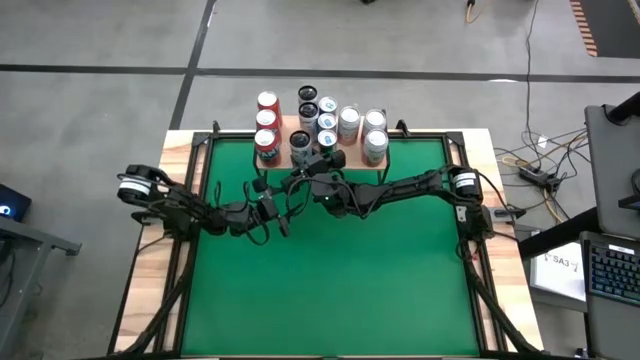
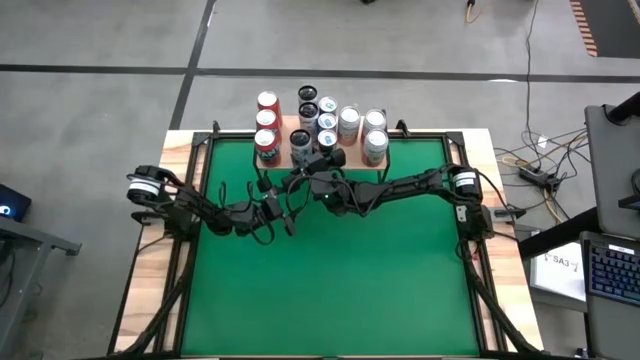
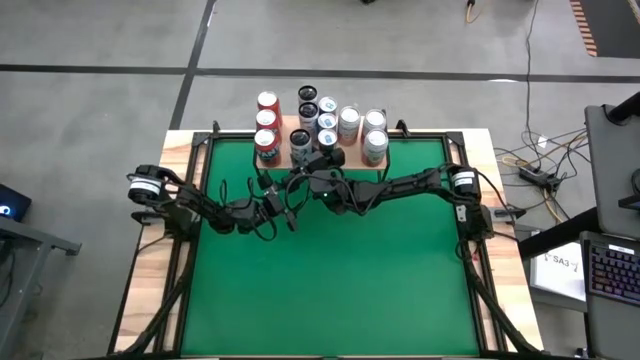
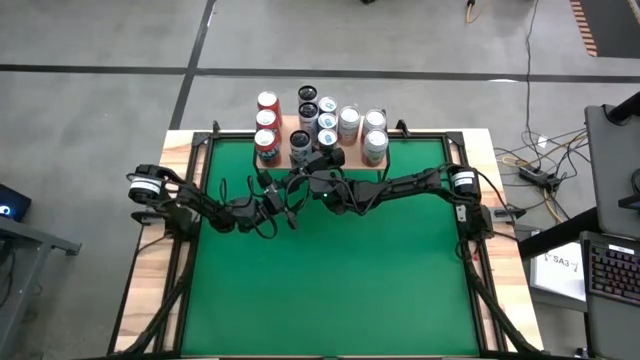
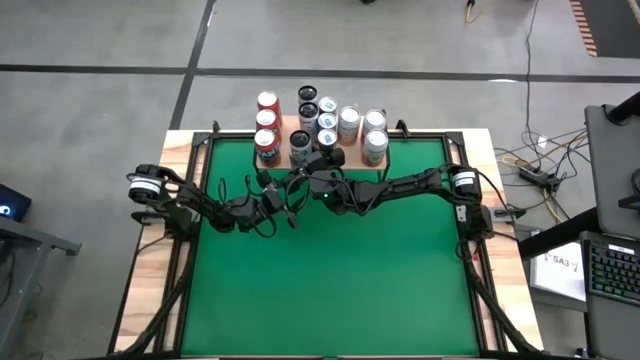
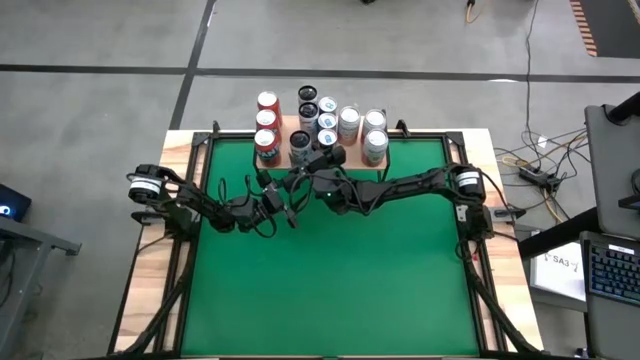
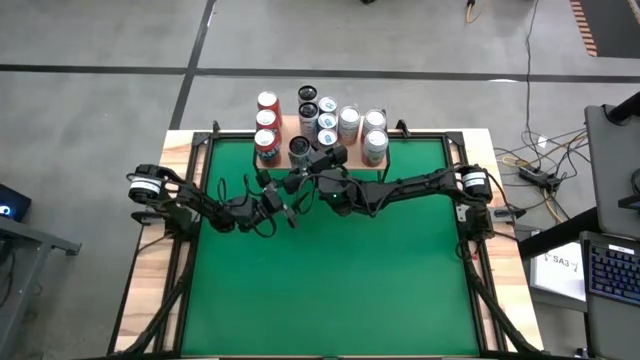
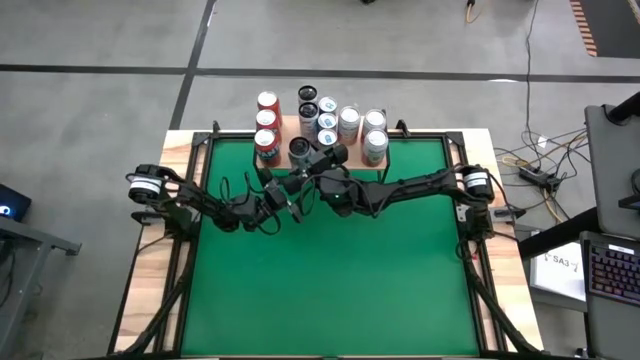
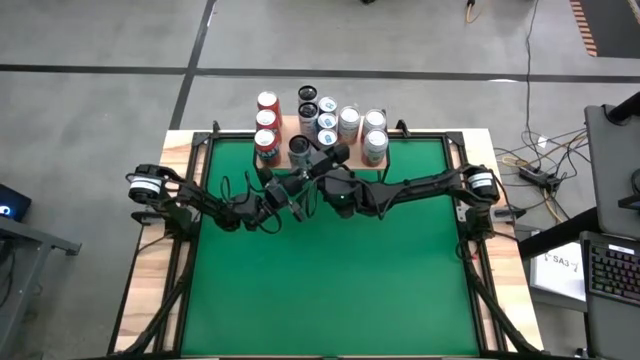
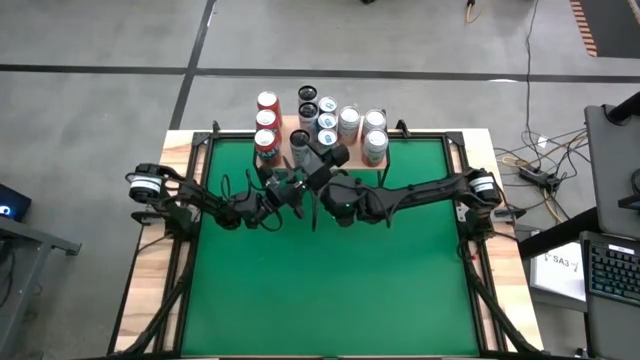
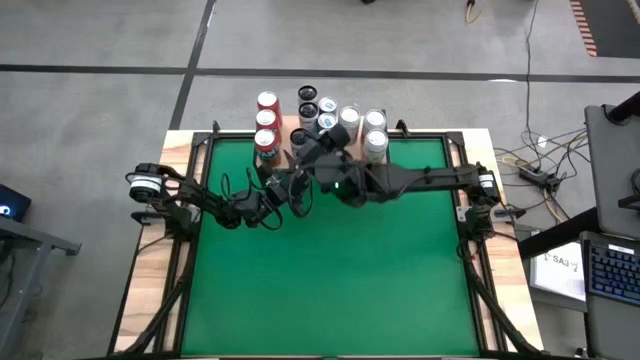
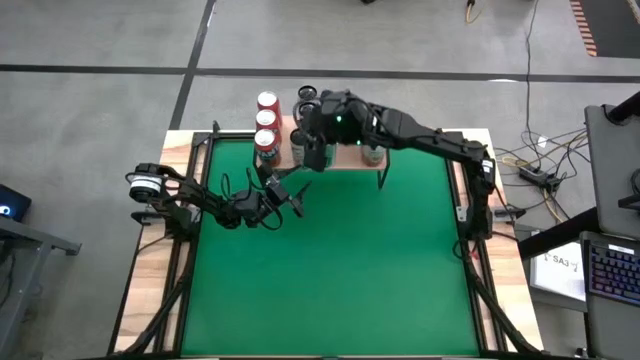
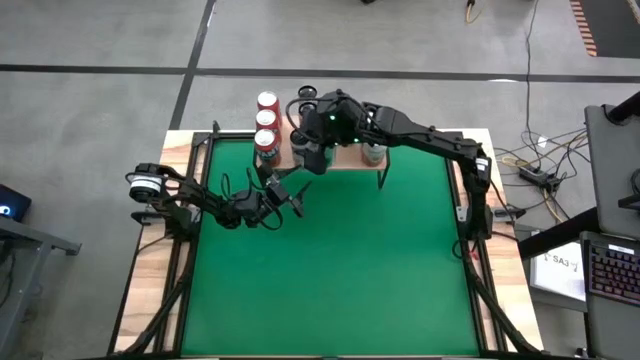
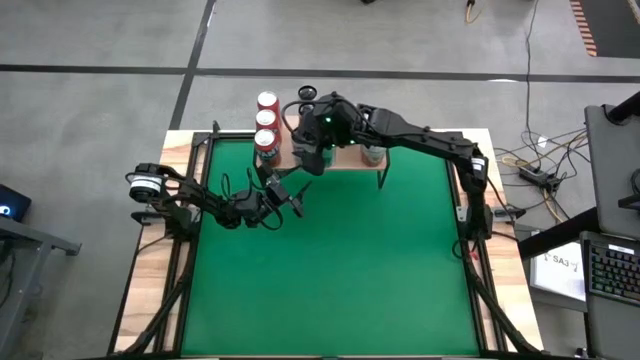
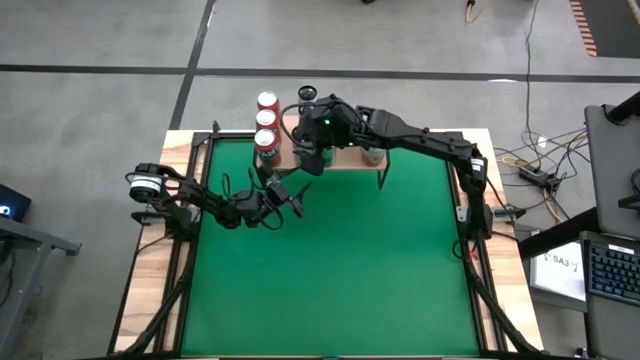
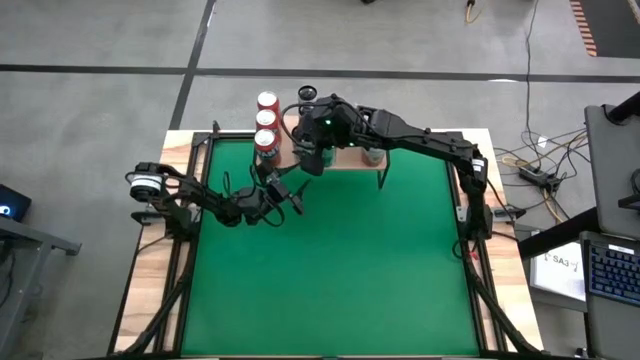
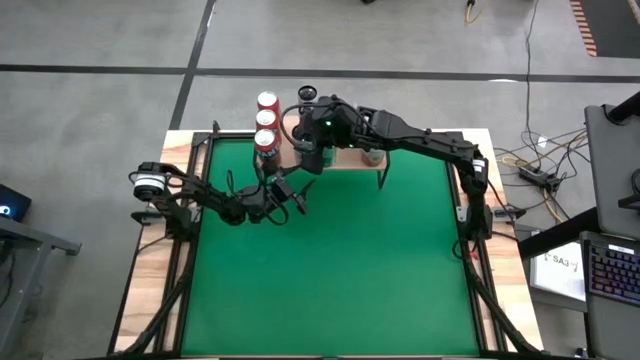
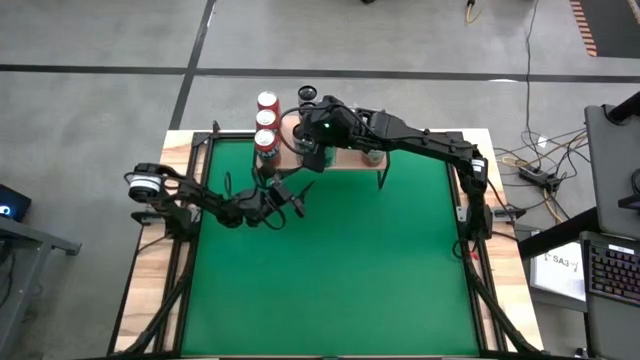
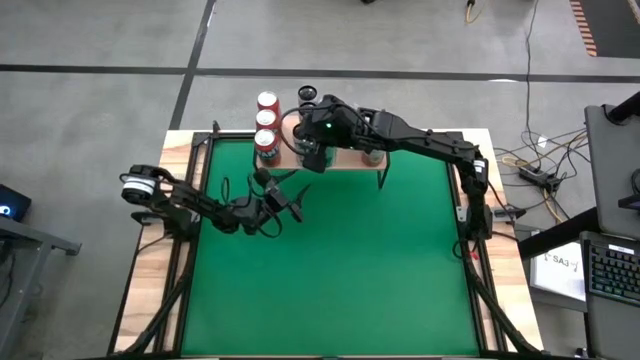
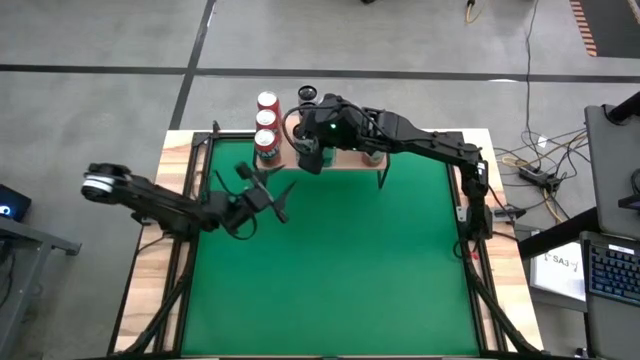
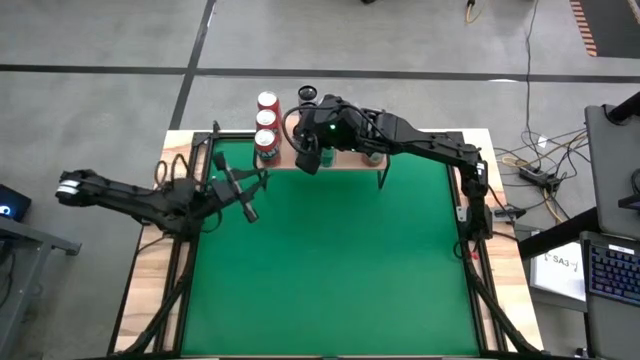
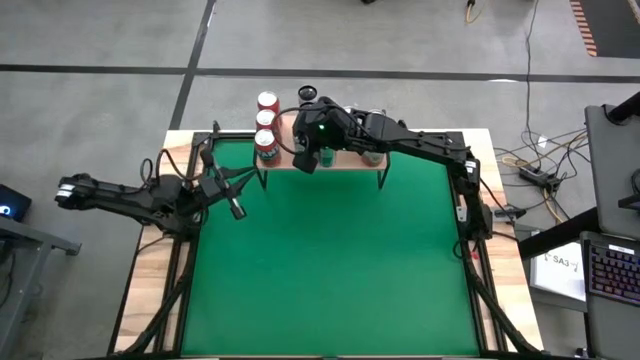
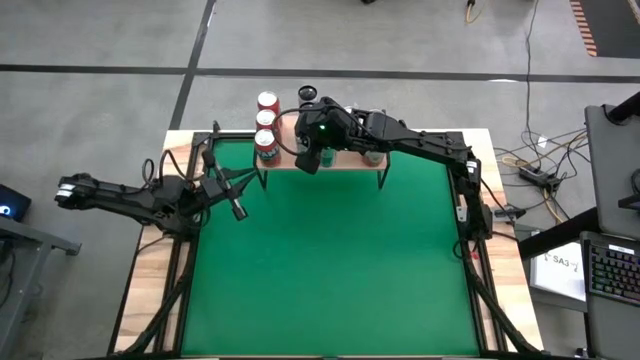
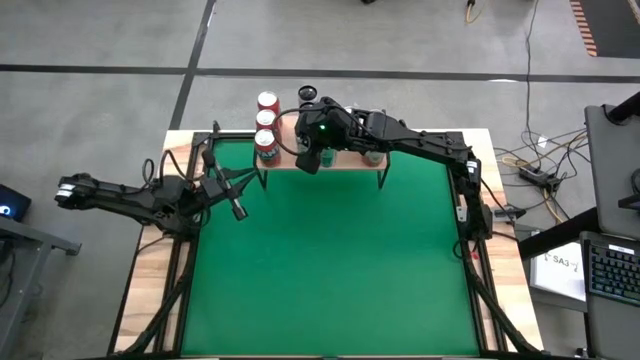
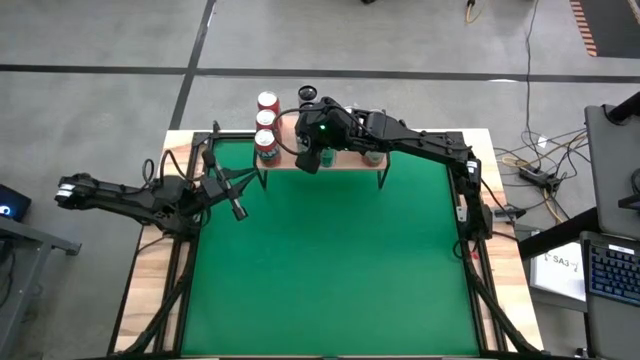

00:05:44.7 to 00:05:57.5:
Task: Place canned beverage on shelf
Put the white soda can on the shelf aligned with other white soda cans on the shelf

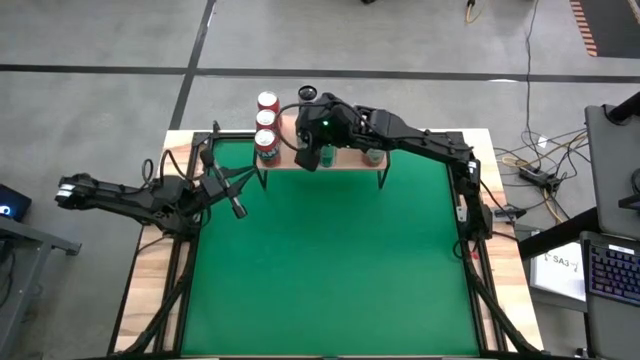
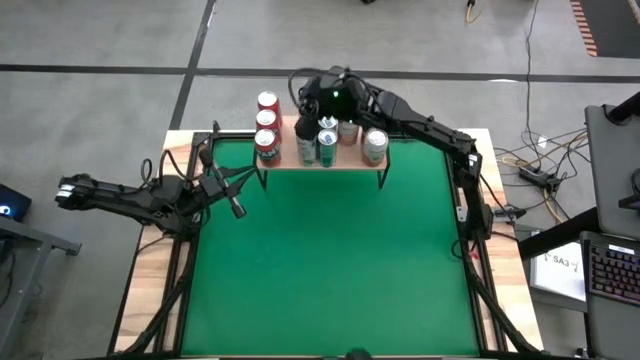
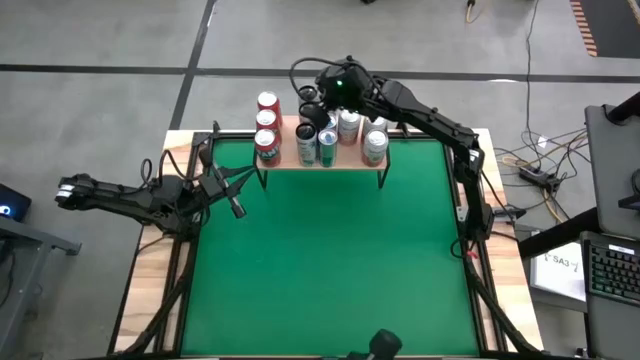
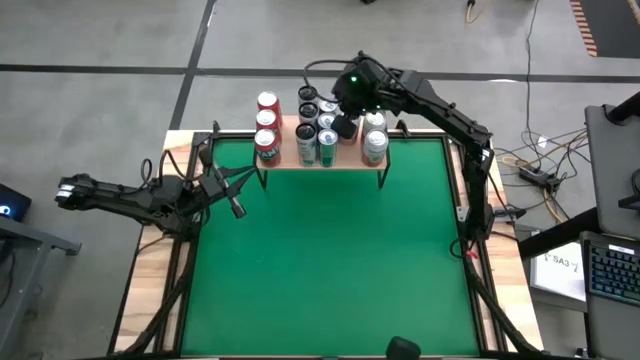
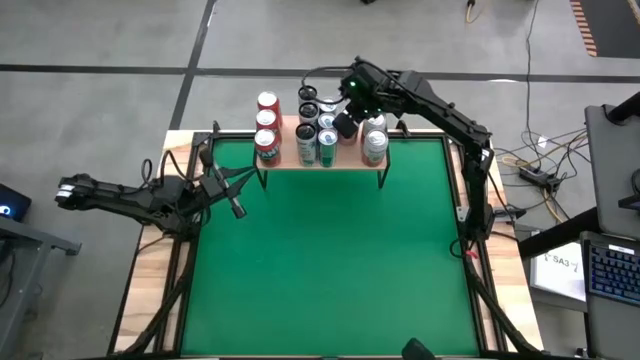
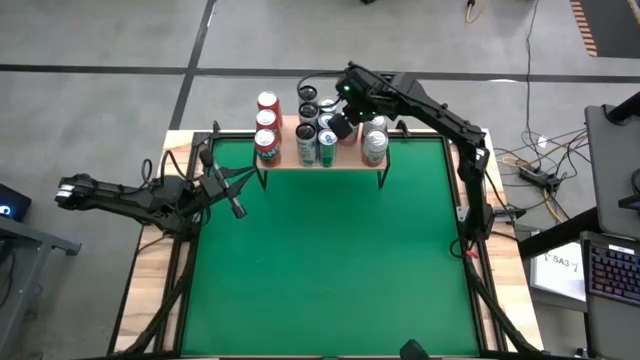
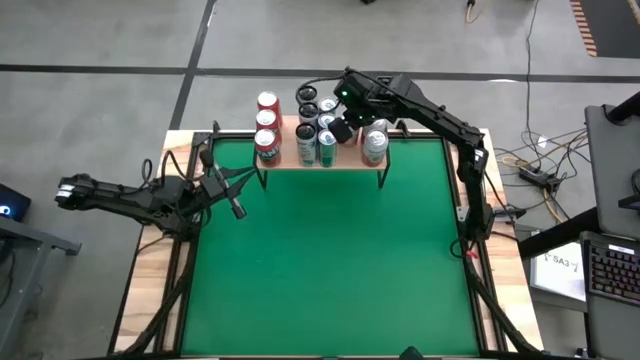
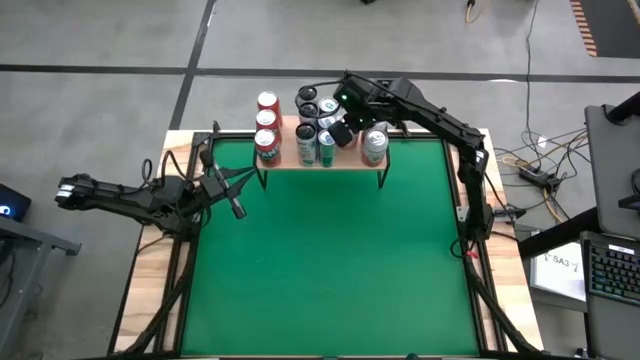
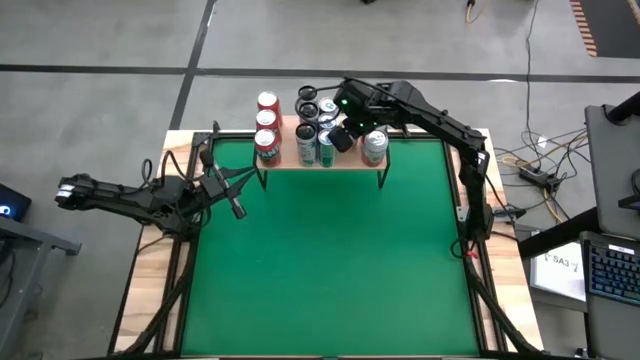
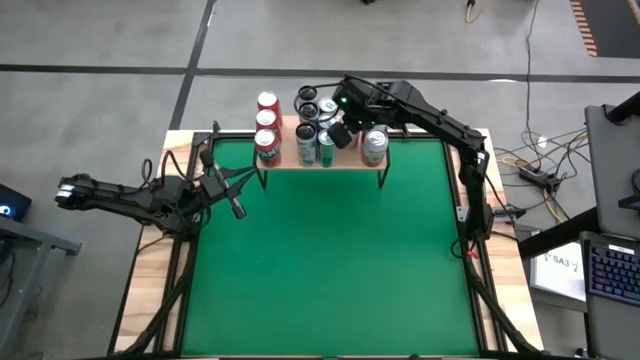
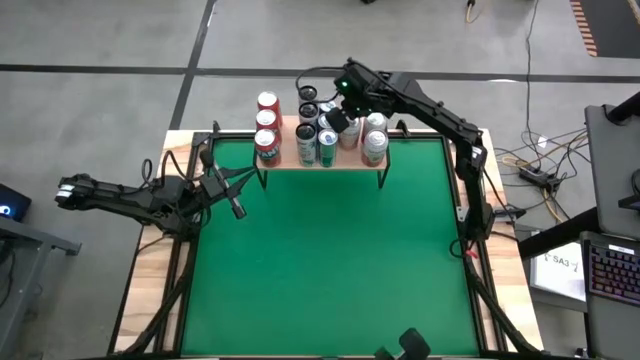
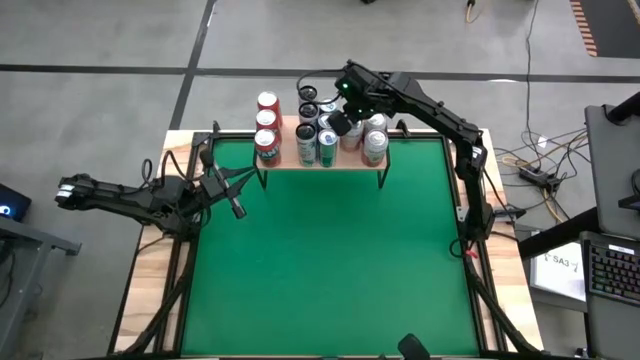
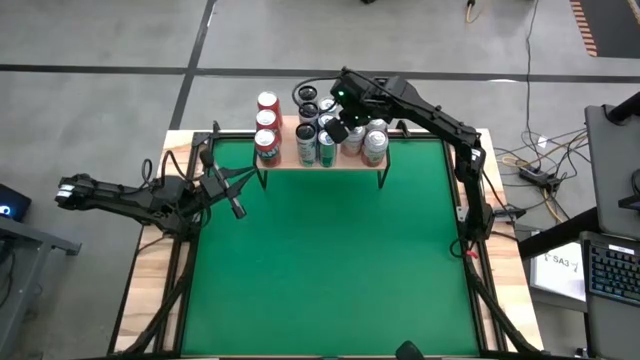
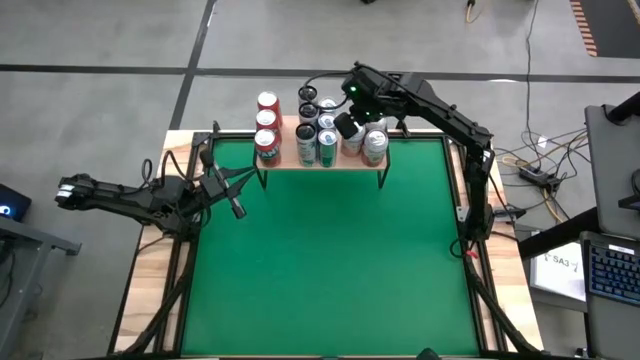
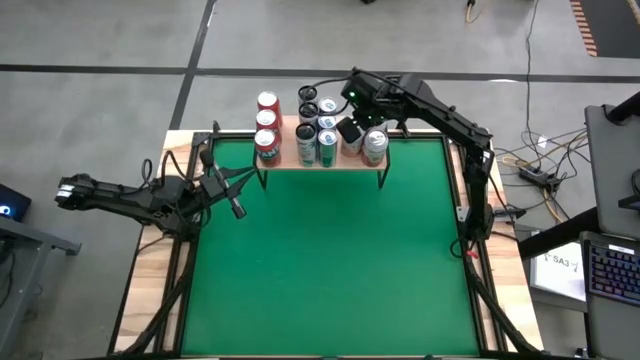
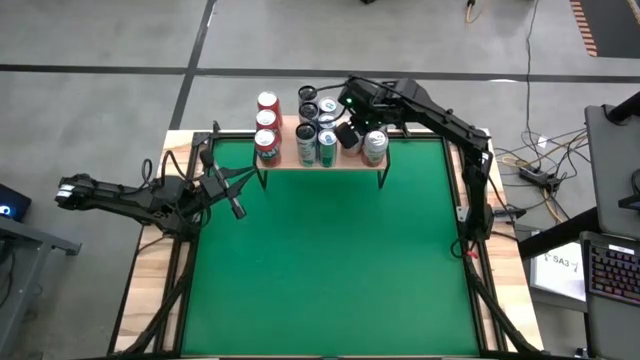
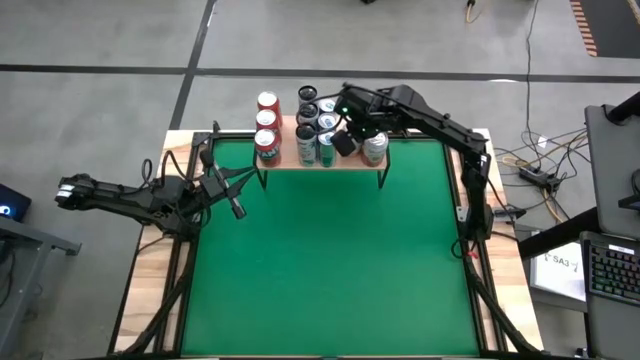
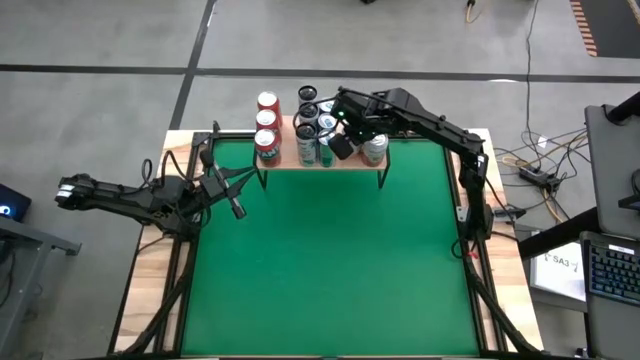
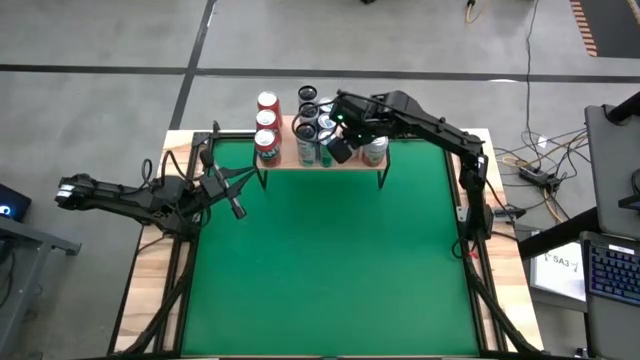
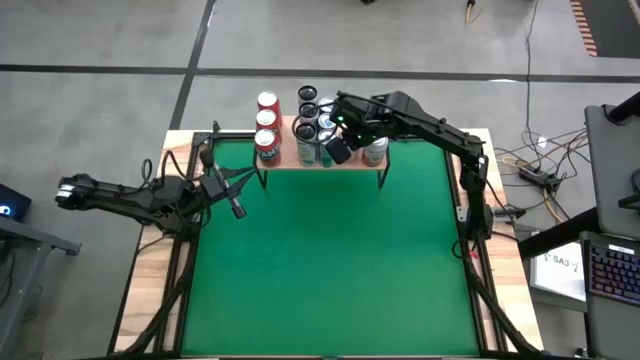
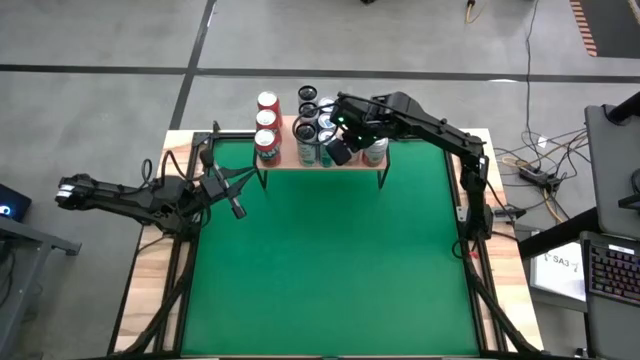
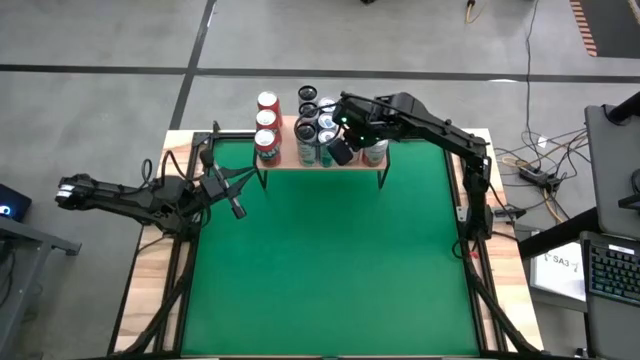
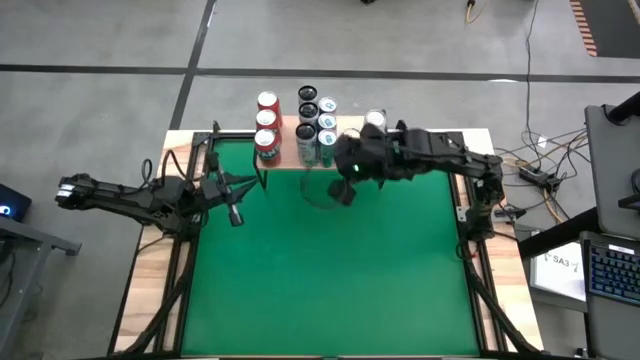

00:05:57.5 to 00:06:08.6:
Adjust the white orange soda can on the shelf
